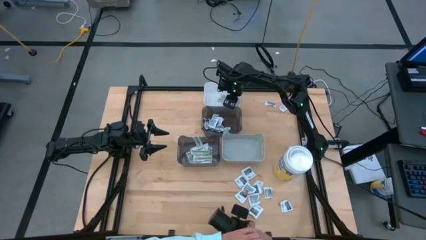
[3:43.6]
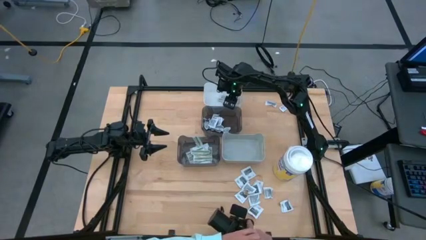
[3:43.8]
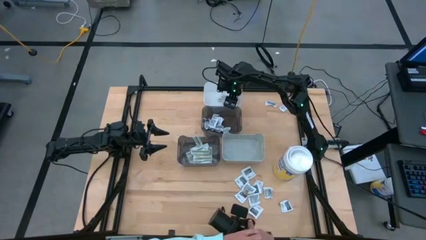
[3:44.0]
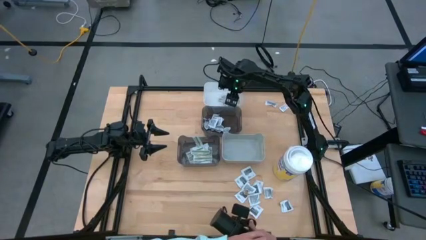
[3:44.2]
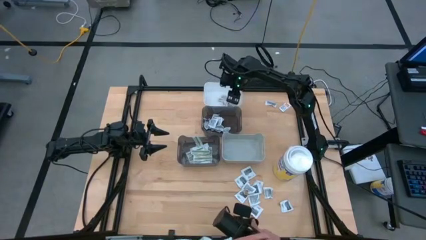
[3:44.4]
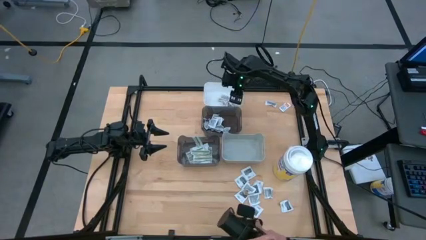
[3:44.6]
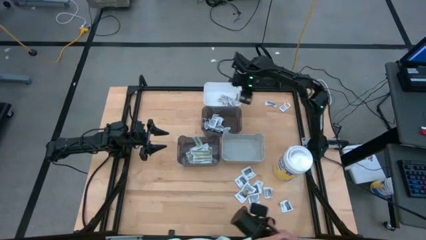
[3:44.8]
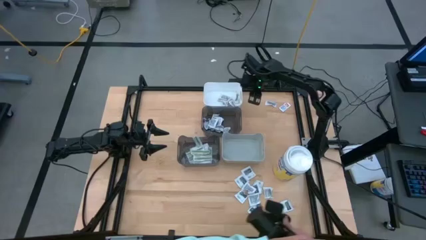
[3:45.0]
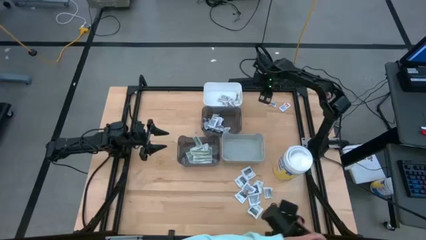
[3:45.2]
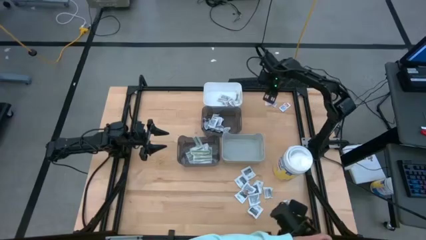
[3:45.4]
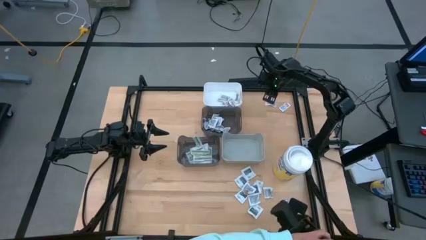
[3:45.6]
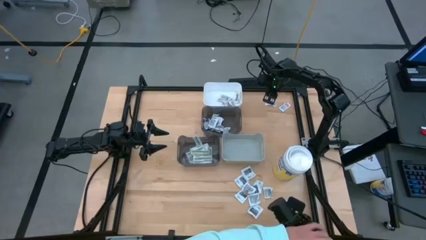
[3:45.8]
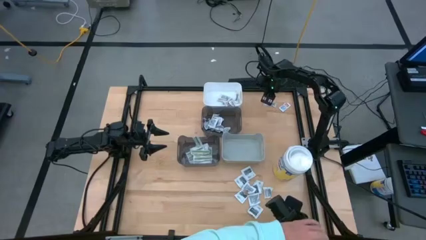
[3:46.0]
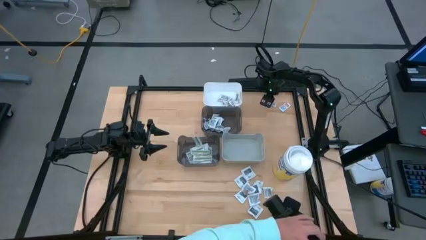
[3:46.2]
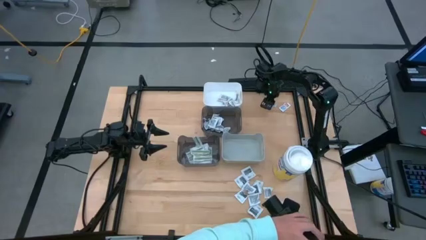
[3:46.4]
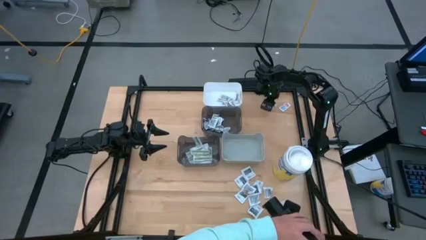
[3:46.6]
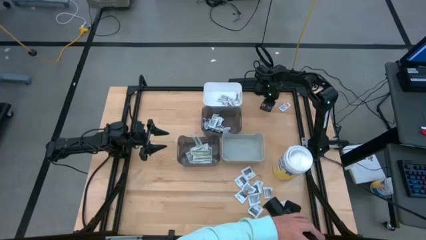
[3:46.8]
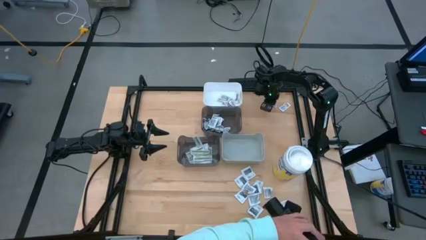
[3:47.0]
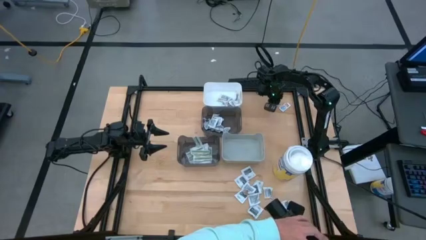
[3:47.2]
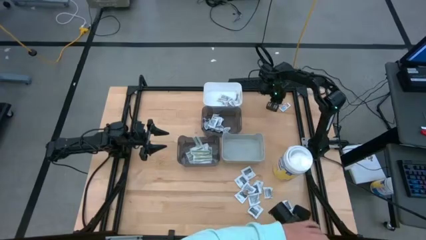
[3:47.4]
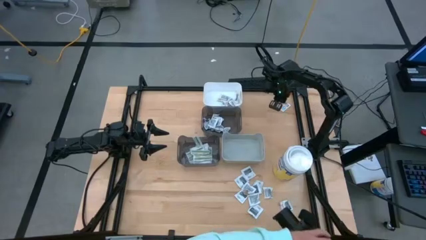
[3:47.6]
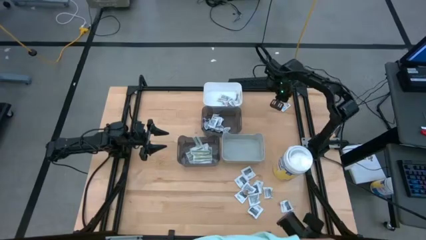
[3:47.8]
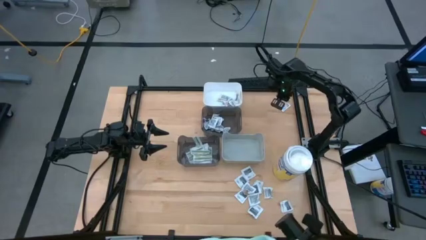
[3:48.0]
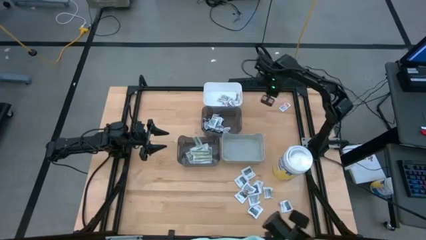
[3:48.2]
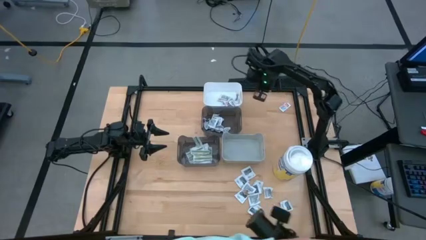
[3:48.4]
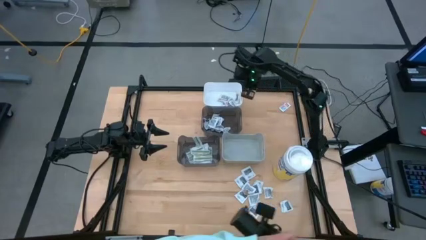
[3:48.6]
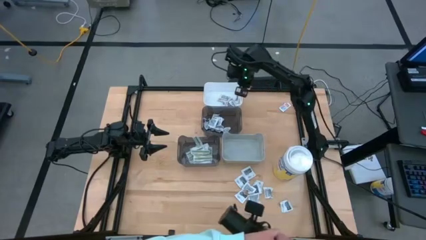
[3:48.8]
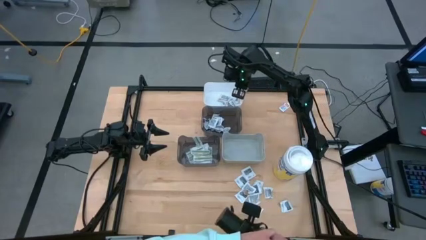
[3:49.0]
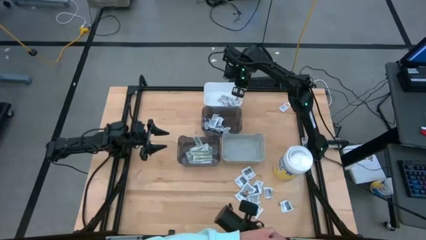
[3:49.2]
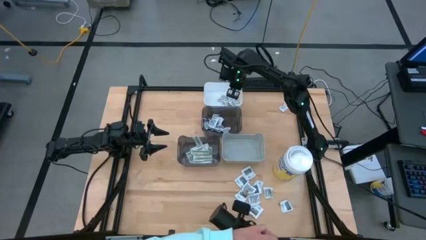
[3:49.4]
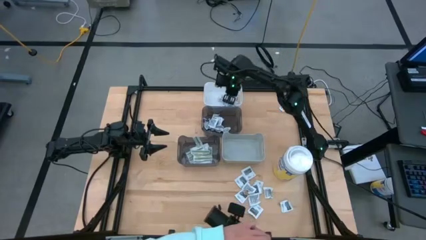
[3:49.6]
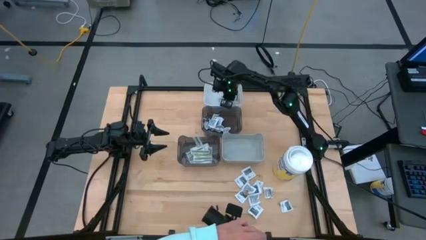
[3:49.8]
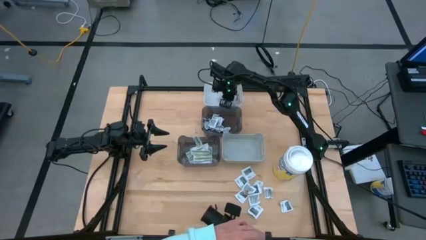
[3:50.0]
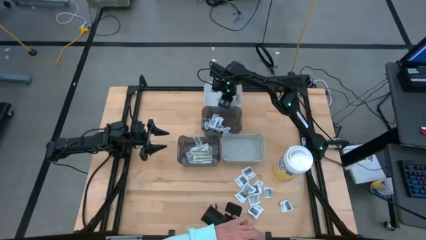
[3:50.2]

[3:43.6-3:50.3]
Task: Pick & Place First Aid Supplies
Put the white ointment pack into the white bin

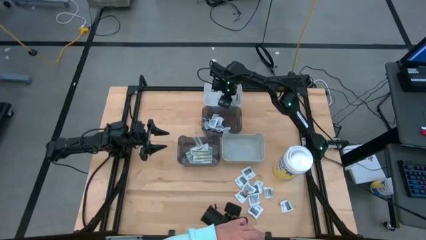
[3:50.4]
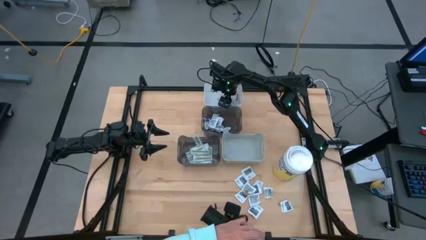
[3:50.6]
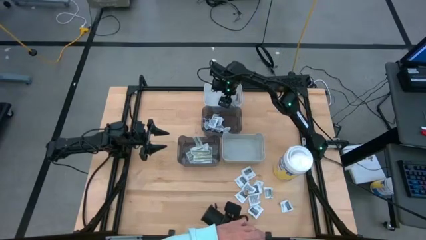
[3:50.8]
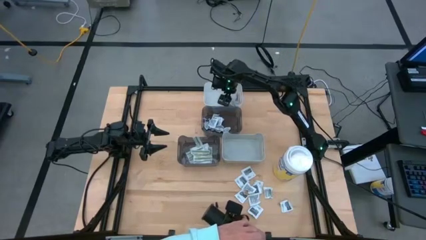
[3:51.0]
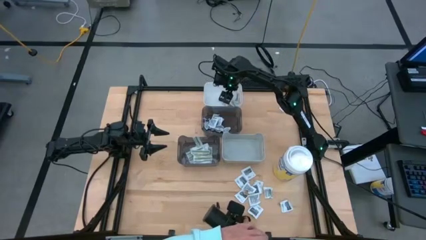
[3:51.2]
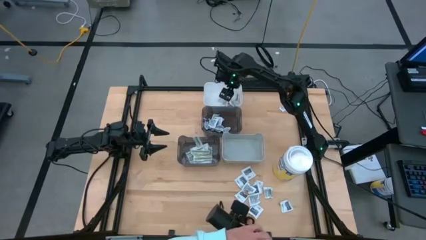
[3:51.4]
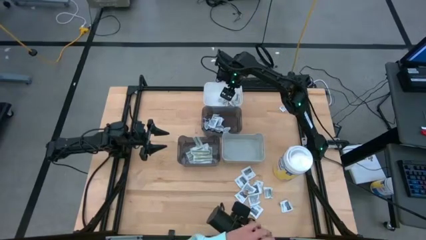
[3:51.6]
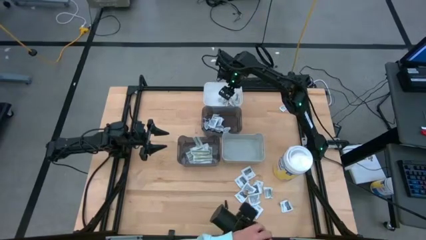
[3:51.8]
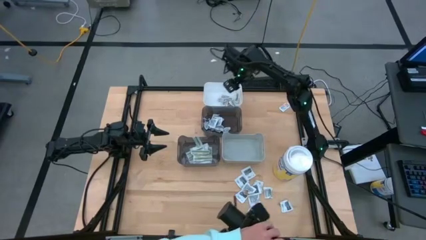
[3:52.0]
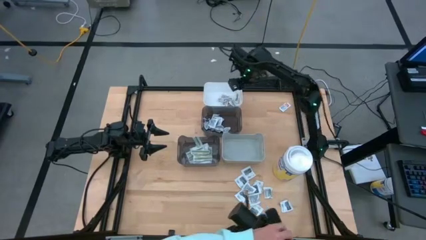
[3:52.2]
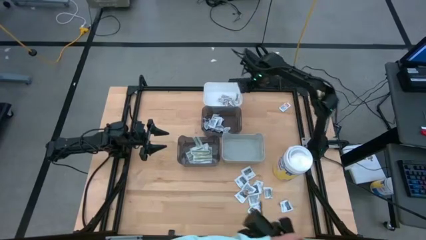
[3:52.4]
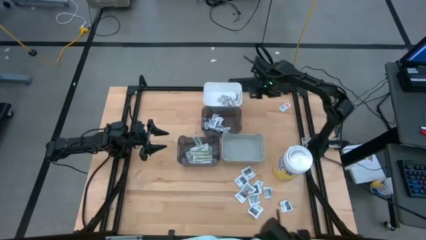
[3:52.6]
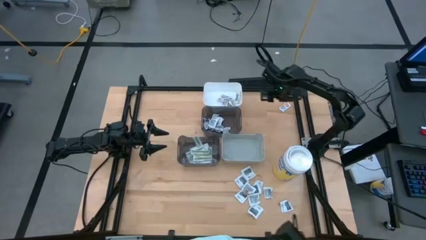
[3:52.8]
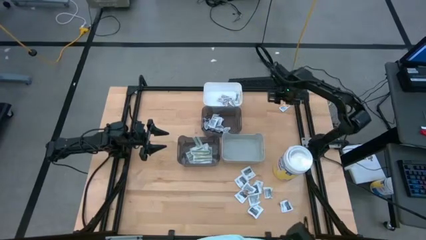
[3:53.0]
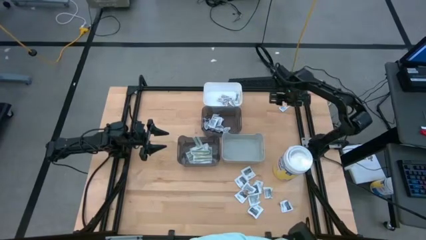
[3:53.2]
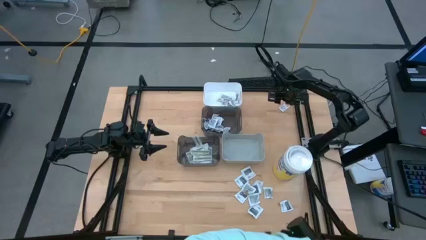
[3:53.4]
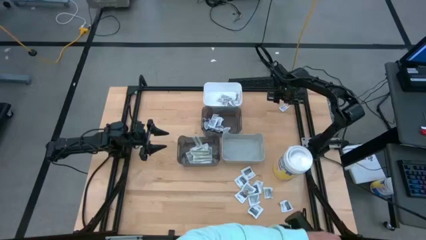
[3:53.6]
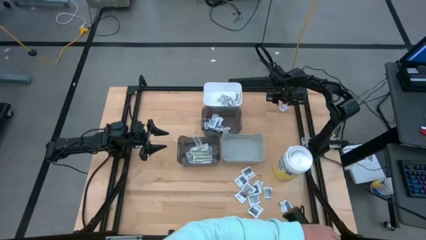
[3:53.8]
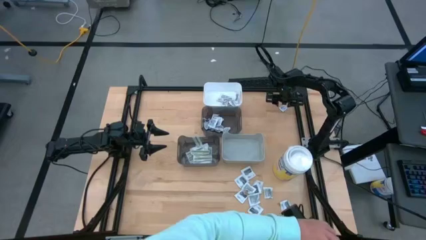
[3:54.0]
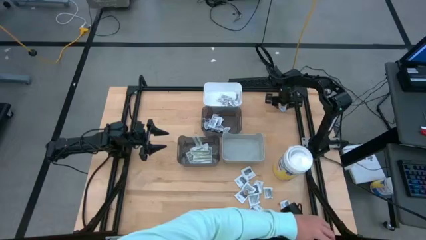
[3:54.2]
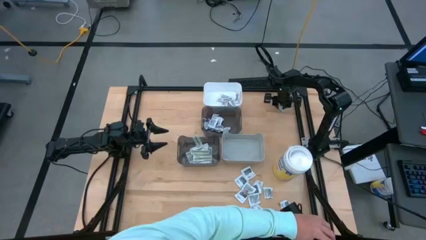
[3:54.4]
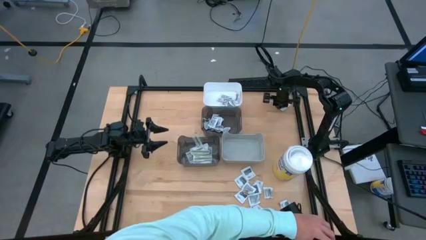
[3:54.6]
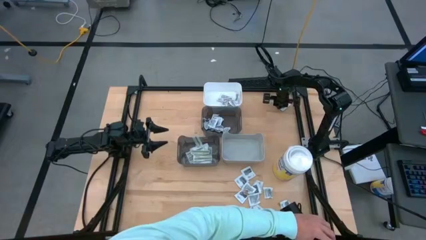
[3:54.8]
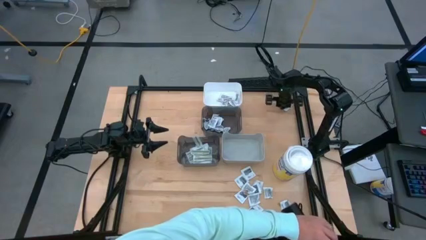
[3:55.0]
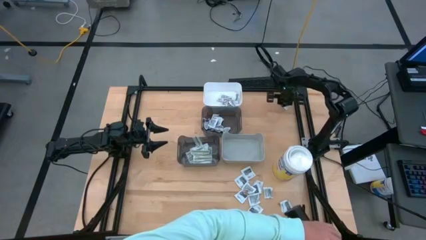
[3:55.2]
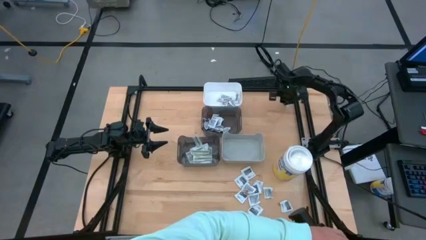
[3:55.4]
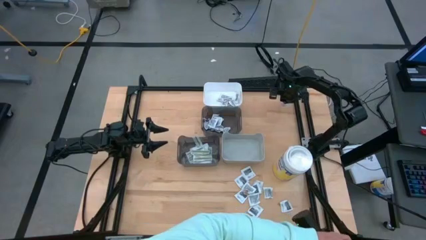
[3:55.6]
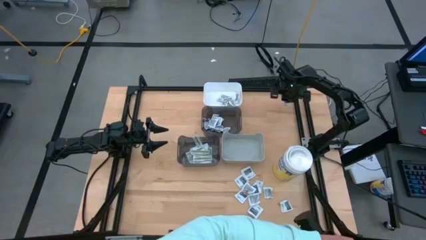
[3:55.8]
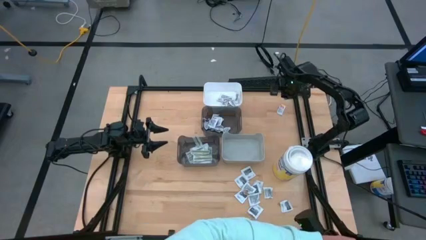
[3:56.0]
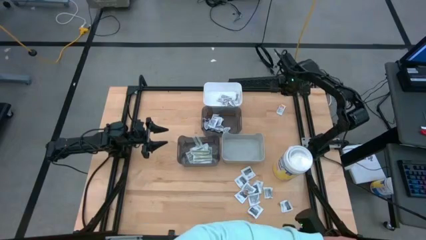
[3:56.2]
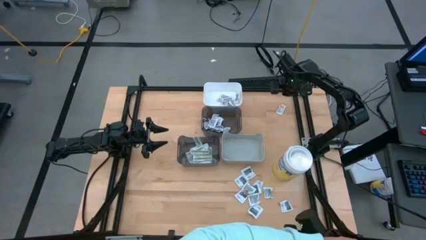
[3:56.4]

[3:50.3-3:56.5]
Put the white ointment pack into the white bin

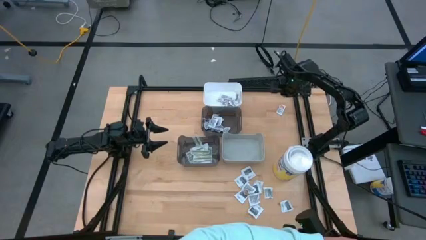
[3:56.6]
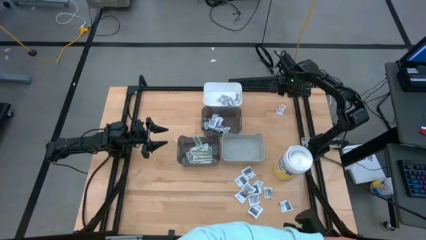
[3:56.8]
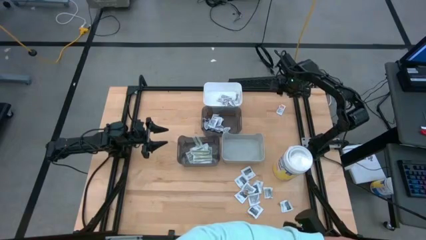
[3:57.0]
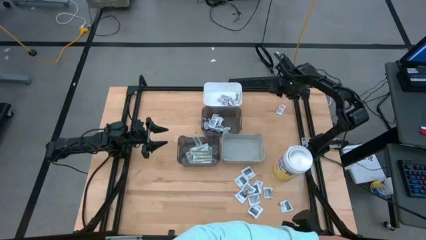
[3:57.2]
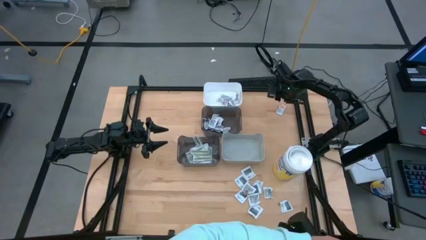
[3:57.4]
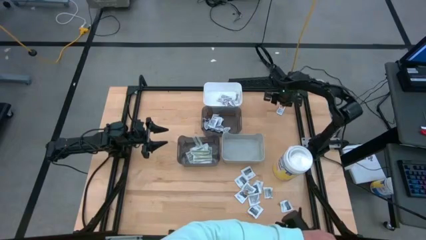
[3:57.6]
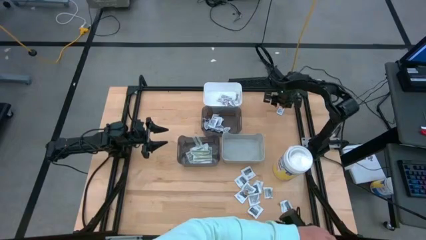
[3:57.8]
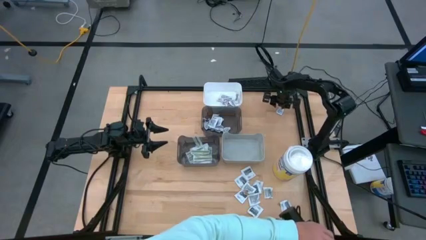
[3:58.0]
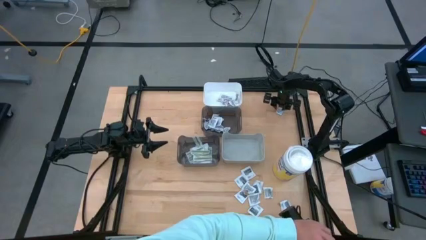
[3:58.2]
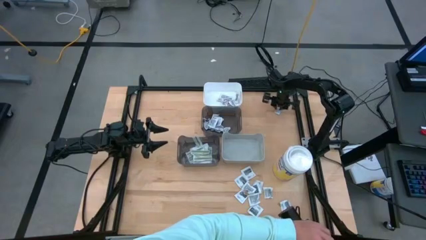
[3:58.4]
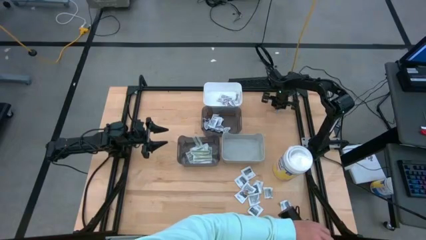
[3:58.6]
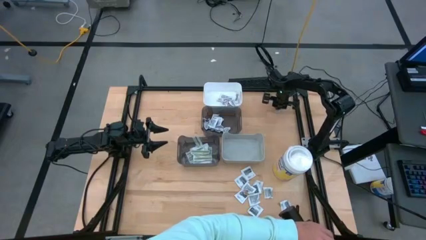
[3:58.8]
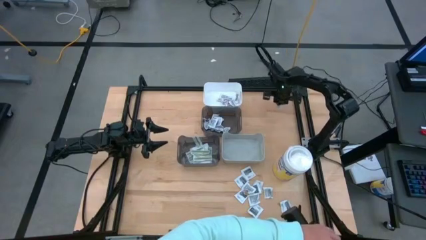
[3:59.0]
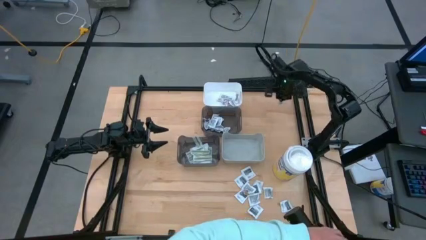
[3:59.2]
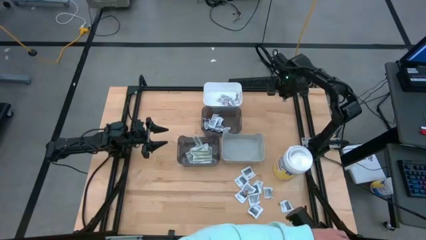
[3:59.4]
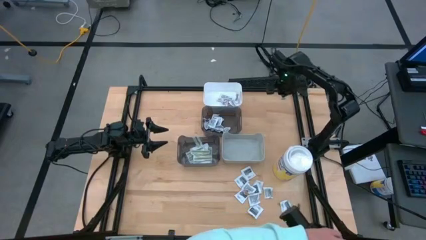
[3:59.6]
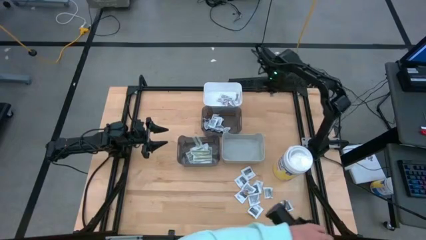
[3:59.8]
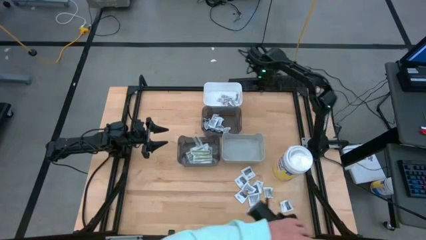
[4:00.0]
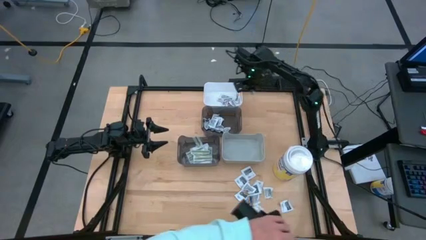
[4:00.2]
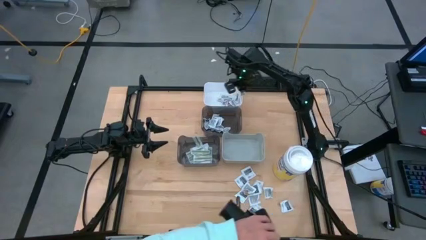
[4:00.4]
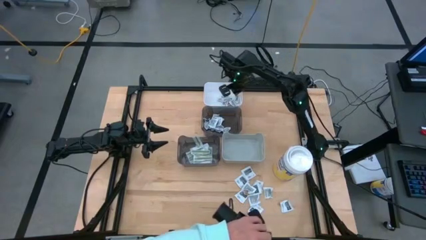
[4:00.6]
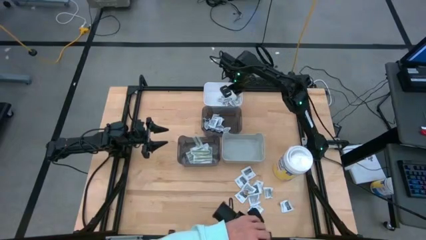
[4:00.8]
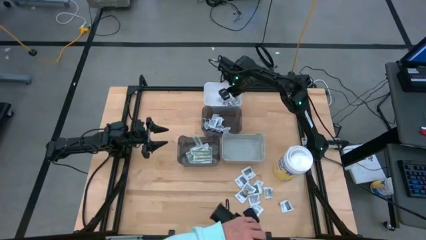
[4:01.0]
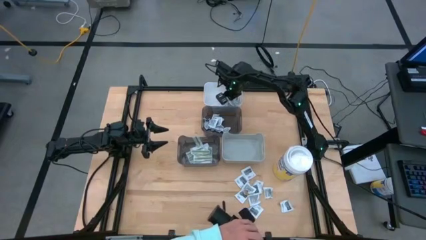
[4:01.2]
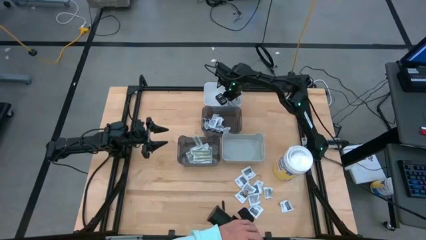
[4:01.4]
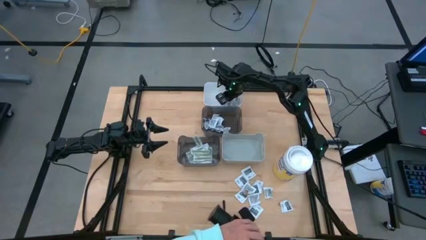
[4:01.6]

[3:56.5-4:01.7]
Put the white ointment pack into the white bin
